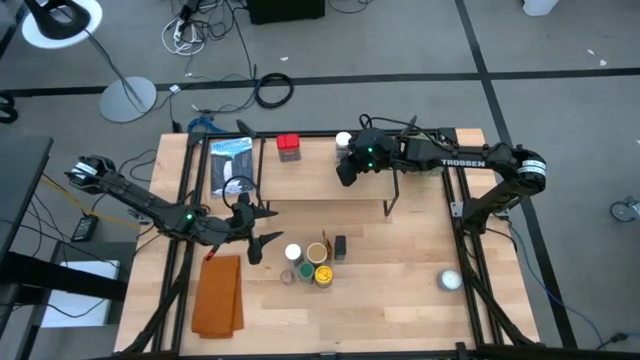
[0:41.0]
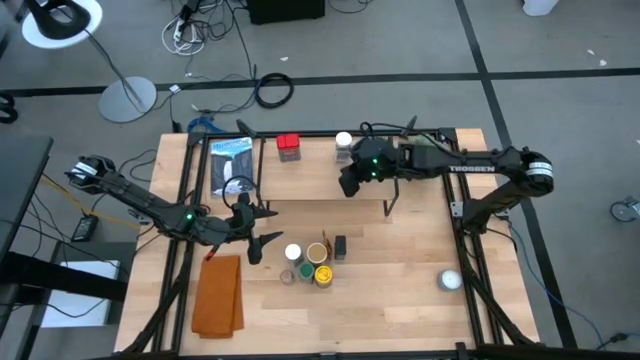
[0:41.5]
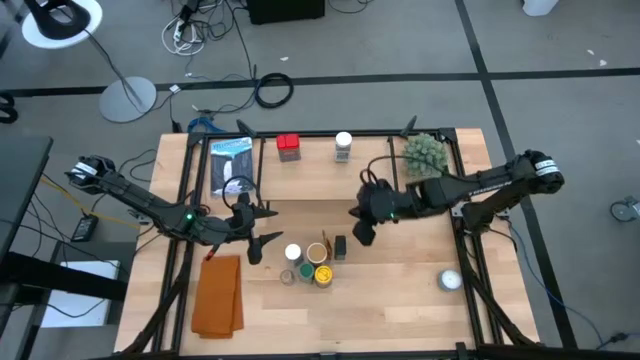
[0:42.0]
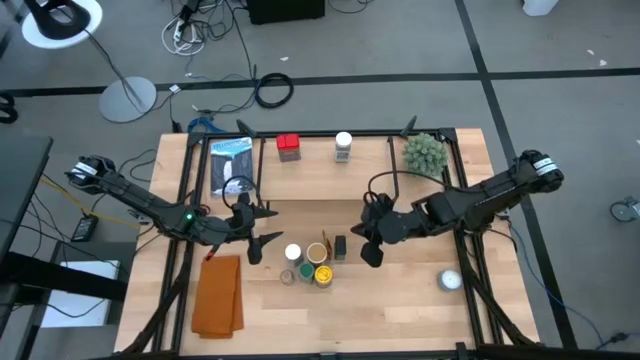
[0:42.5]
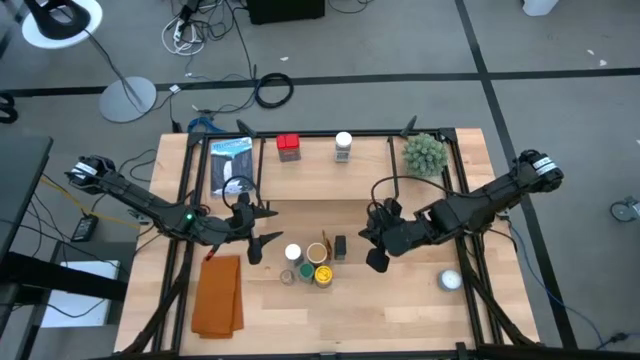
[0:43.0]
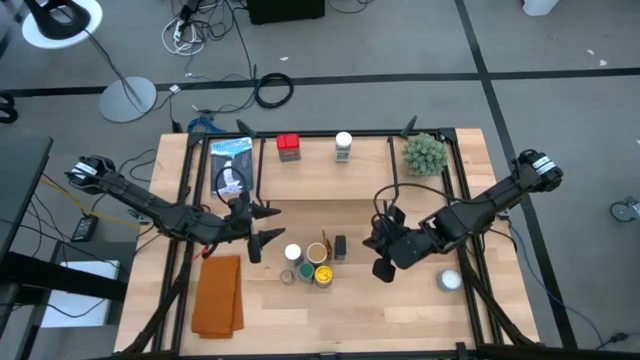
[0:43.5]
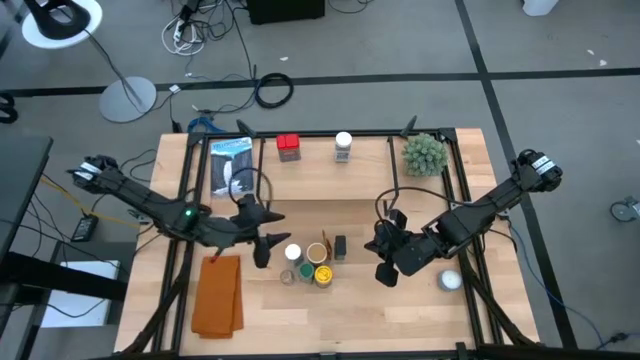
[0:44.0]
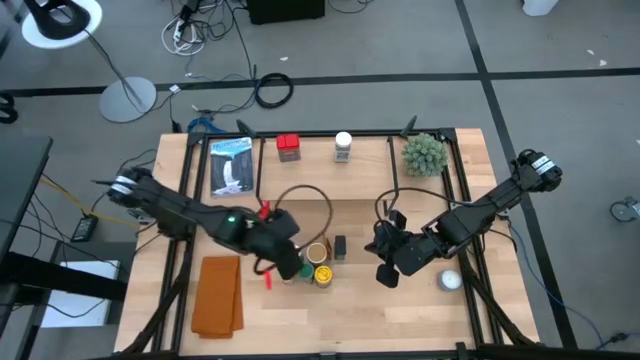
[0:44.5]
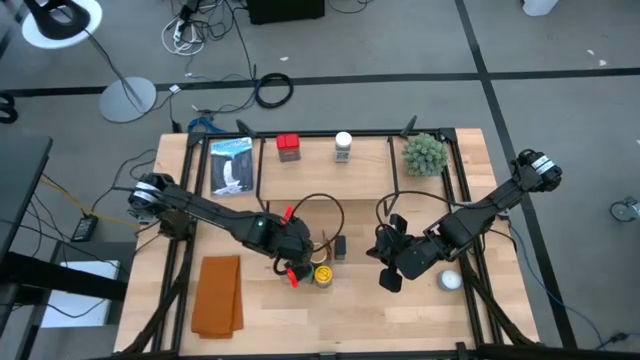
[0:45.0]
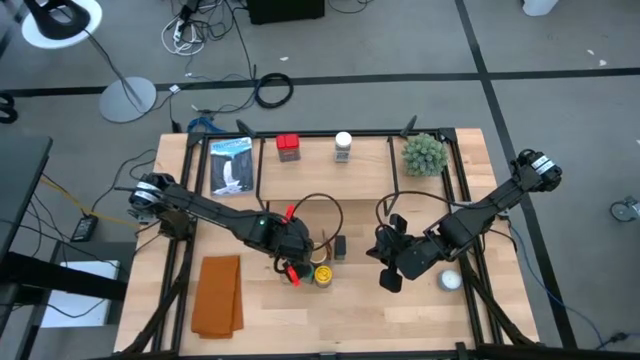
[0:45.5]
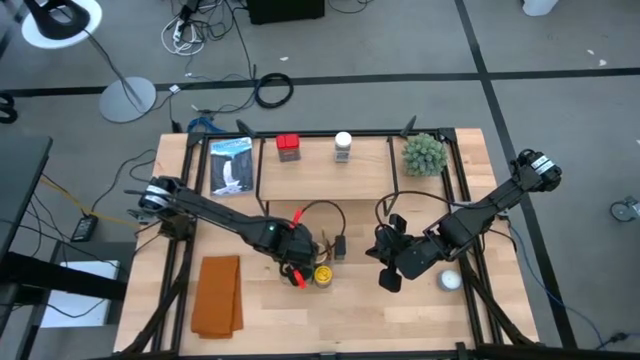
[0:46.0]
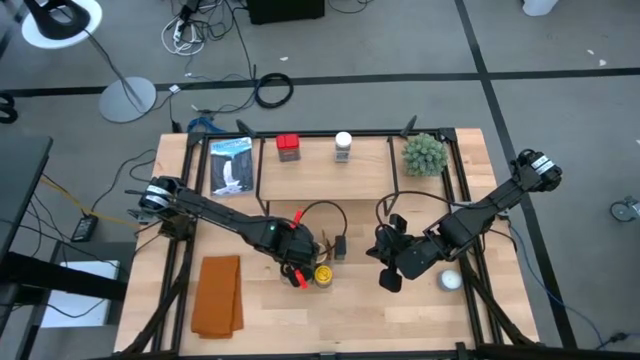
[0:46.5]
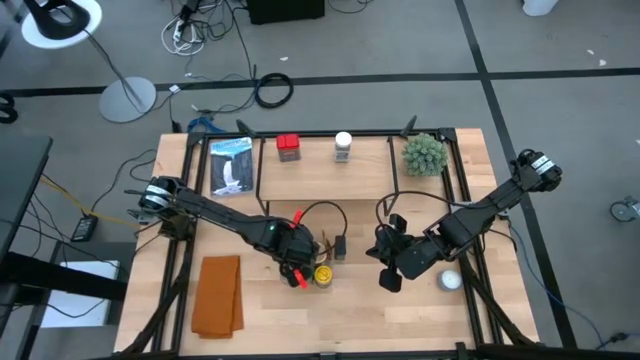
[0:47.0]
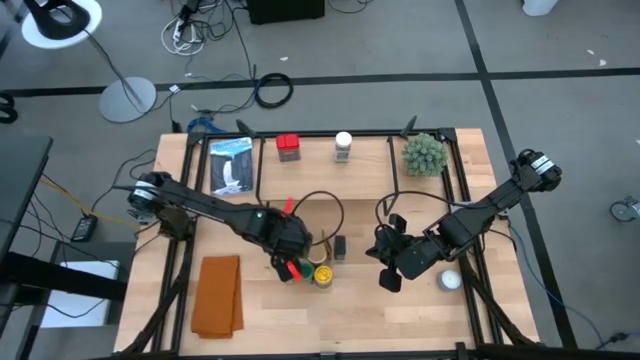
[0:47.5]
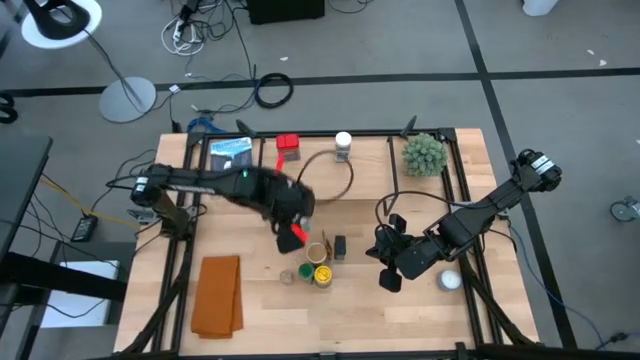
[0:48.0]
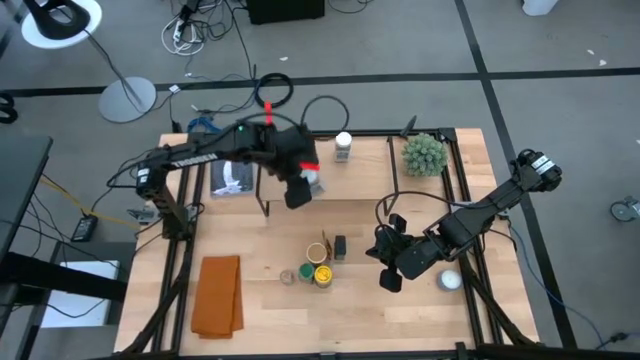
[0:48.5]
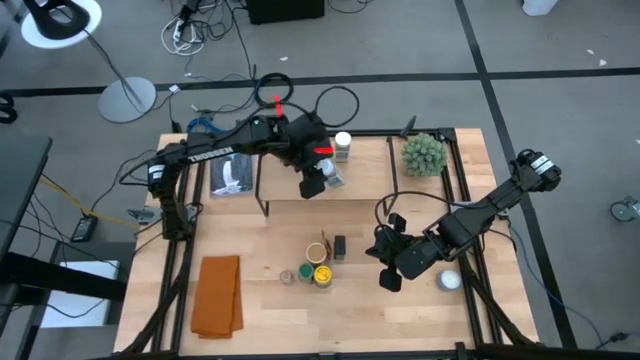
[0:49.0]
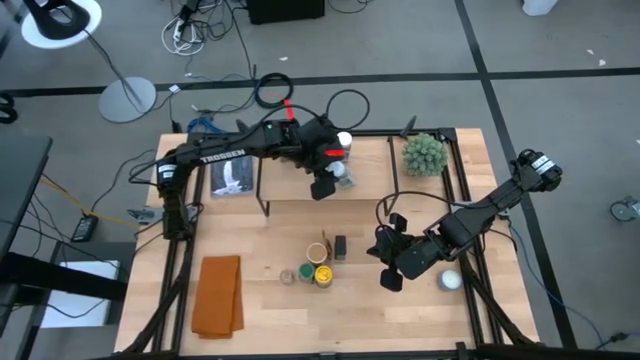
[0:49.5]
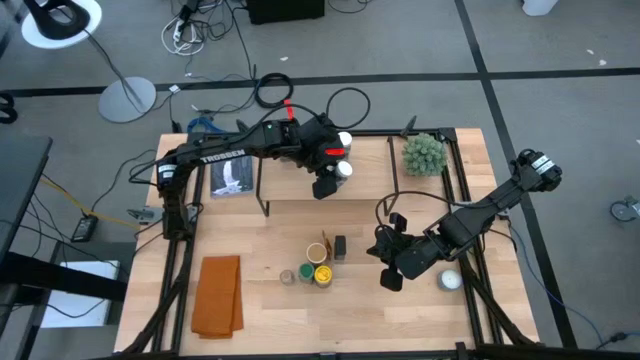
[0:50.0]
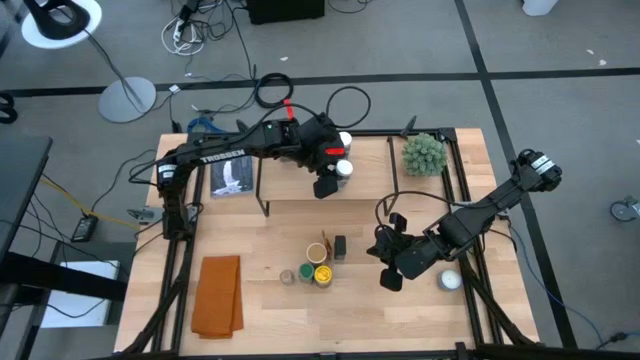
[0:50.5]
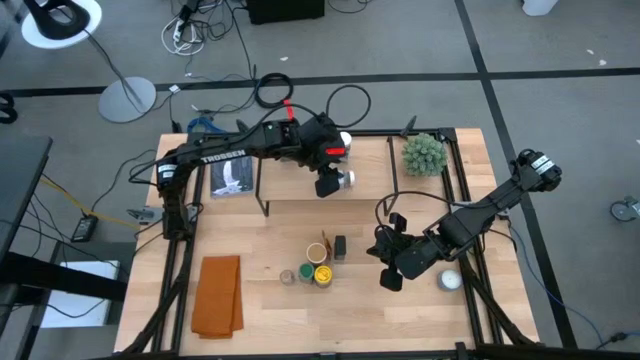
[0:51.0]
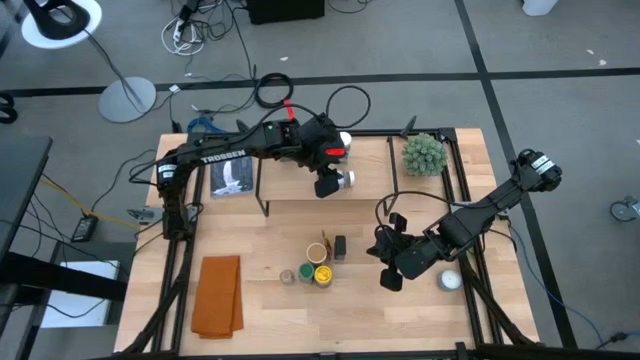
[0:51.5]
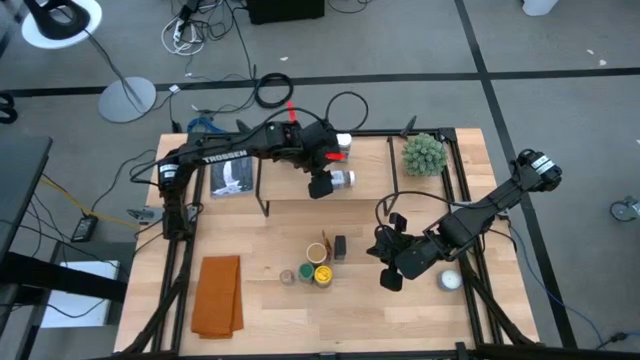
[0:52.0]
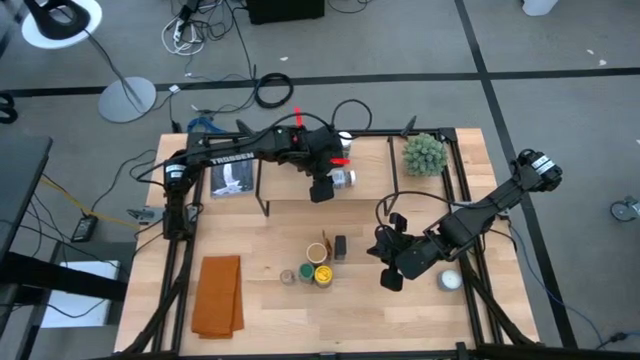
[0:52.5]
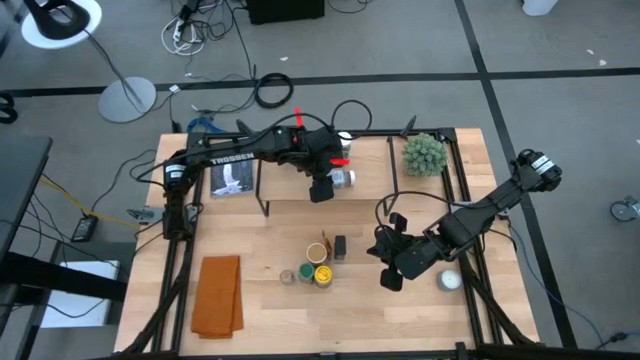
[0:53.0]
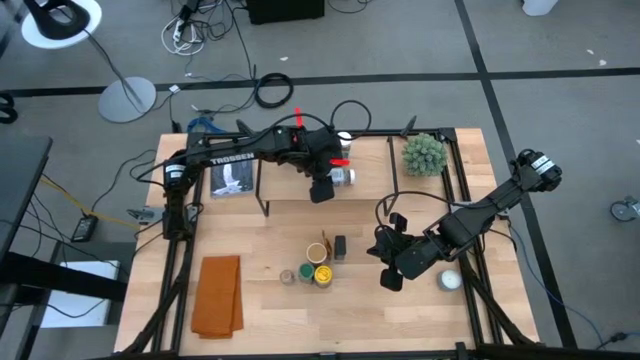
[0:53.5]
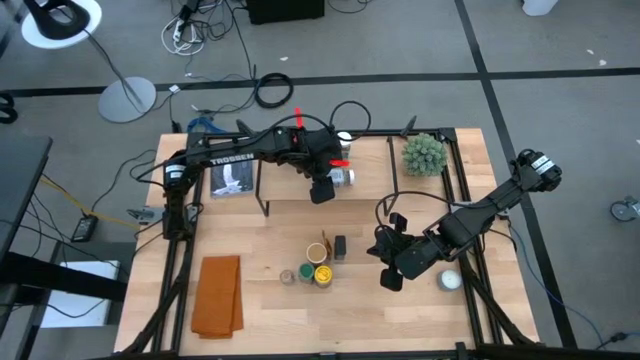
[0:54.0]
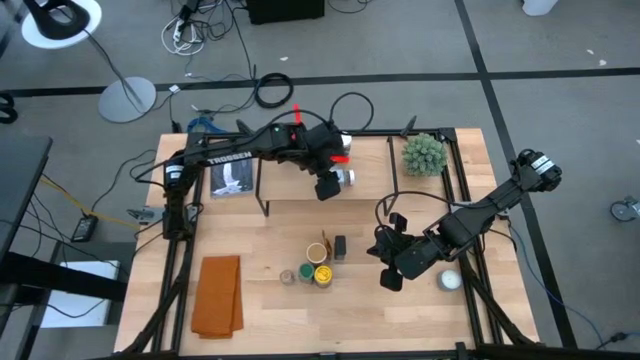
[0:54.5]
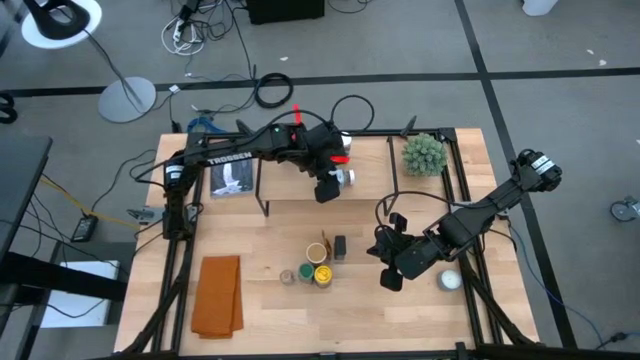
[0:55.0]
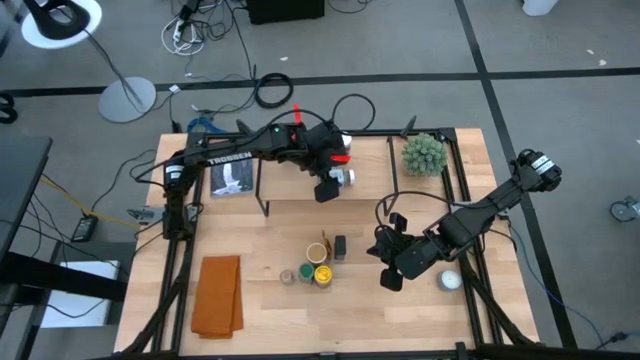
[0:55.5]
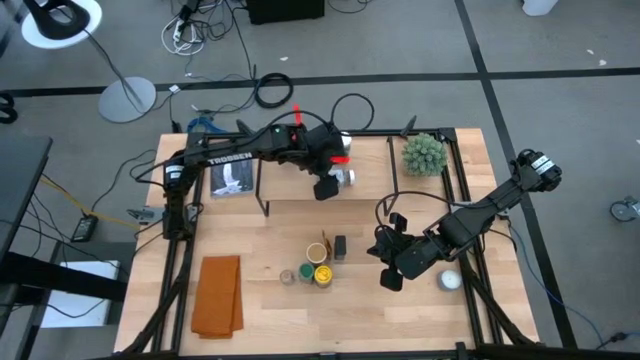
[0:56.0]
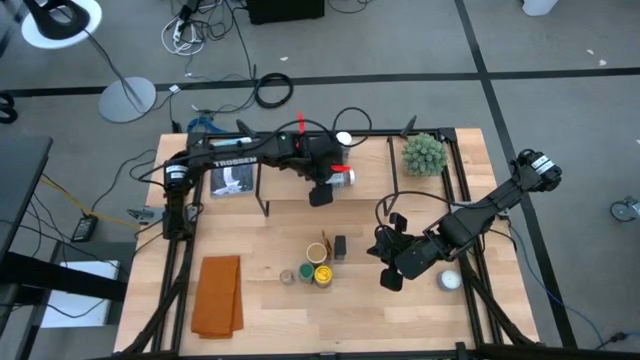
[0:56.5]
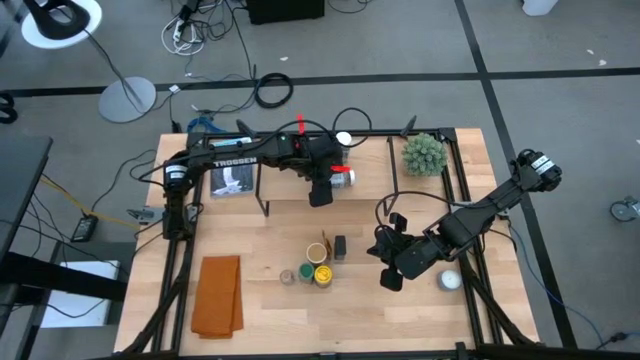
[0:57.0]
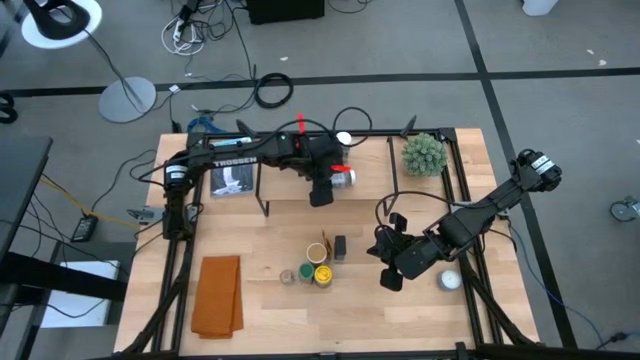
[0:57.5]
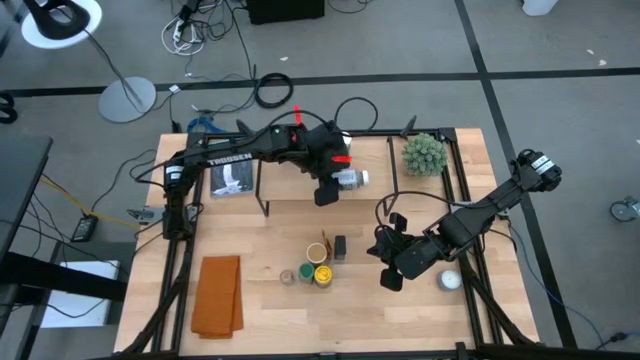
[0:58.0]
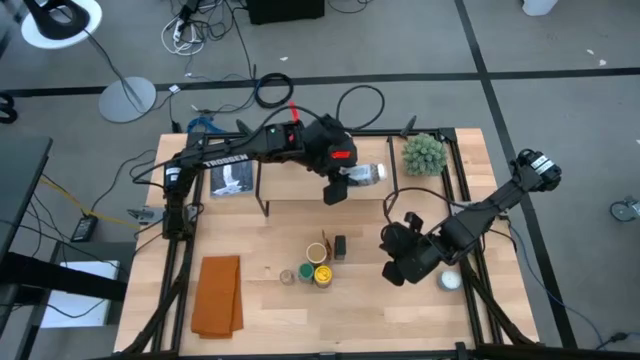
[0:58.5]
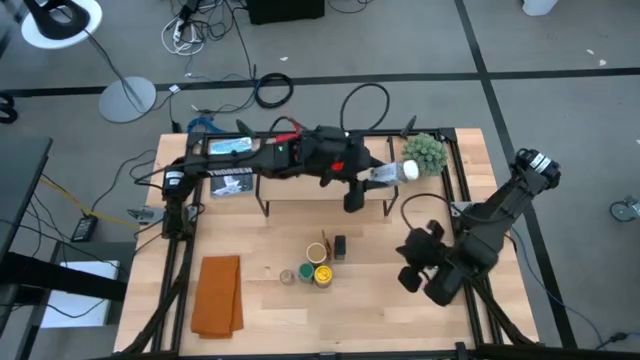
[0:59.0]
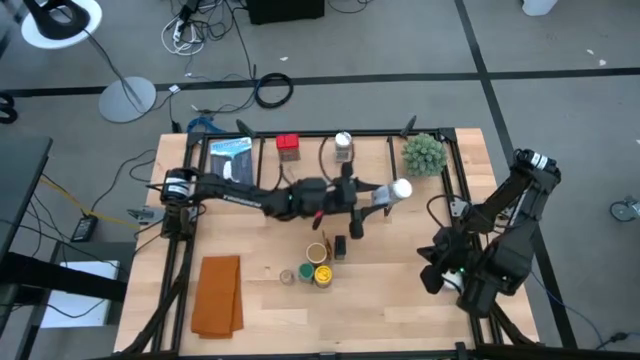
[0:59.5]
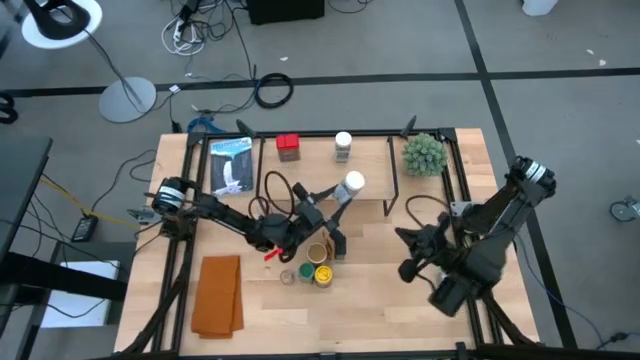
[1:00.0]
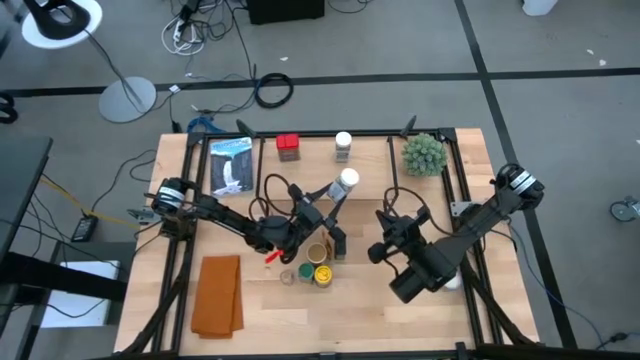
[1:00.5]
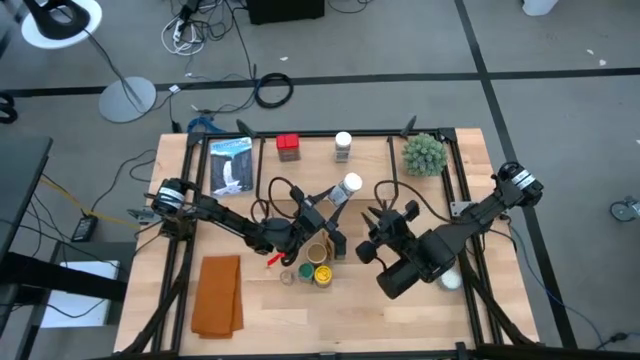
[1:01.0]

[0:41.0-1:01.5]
Task: Shelf spices
Put the white seasoning bottle on the shelf aligned with the other white seasoning bottle

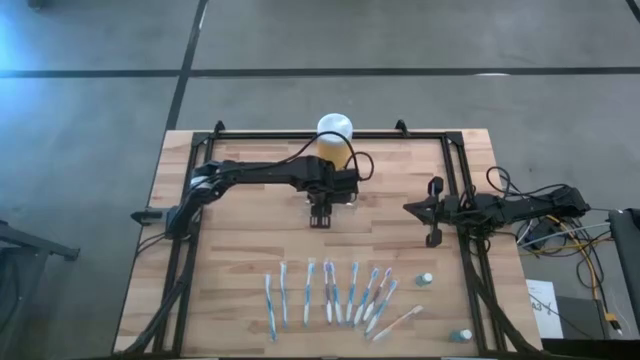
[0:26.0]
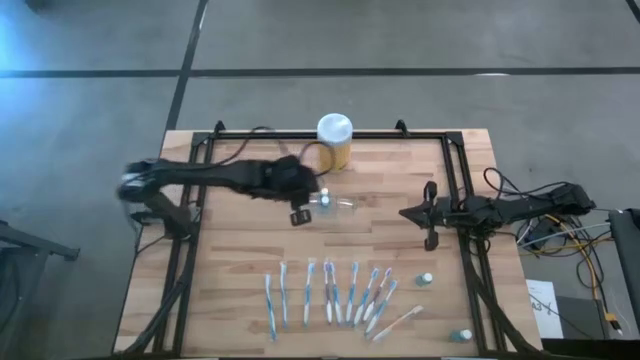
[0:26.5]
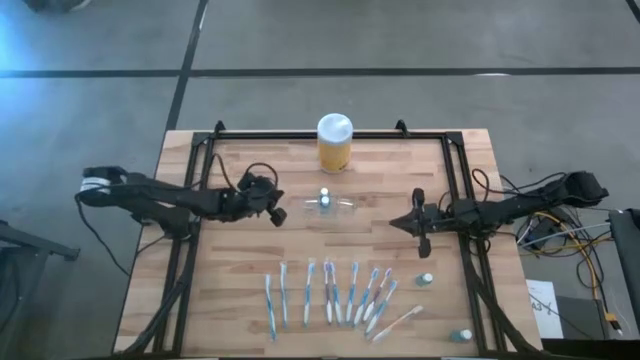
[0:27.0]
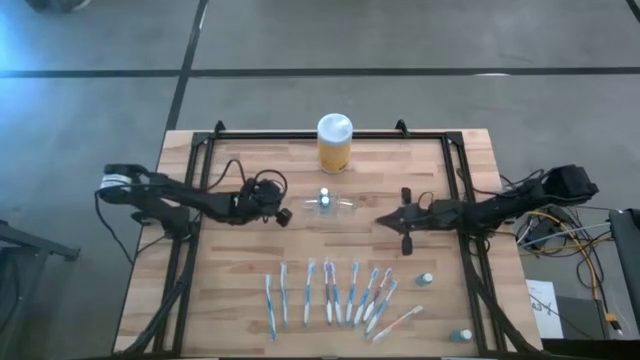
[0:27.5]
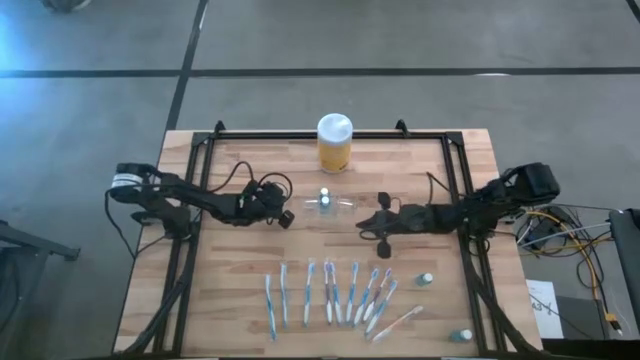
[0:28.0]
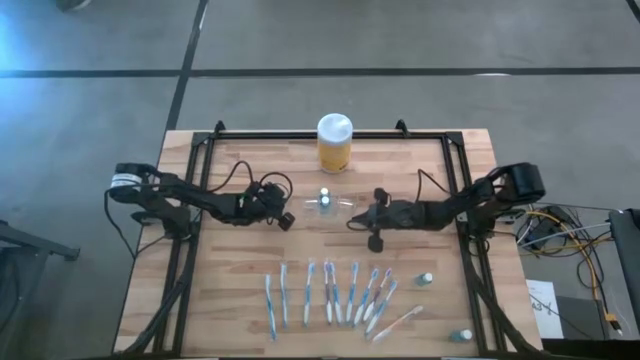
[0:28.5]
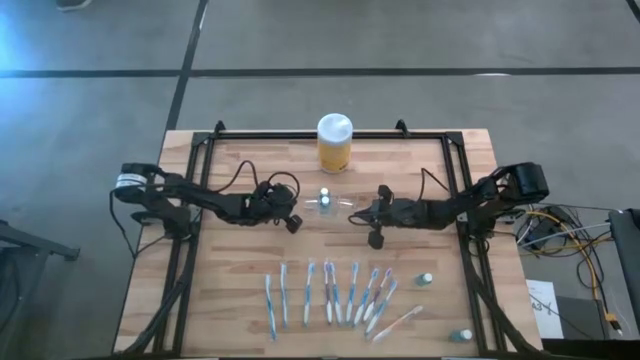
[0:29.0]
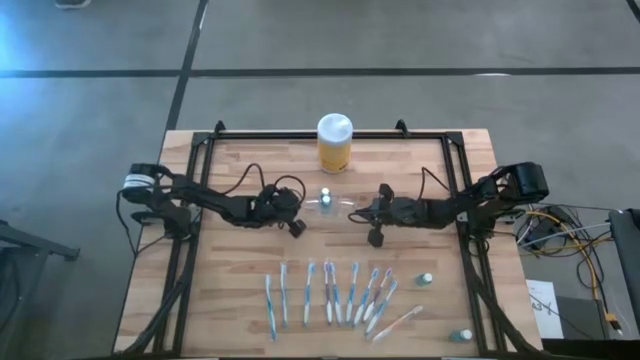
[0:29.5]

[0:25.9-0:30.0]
Task: Pick & Place toothbrushing station
Adjust the transparent organizer
